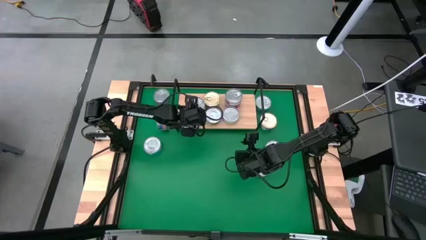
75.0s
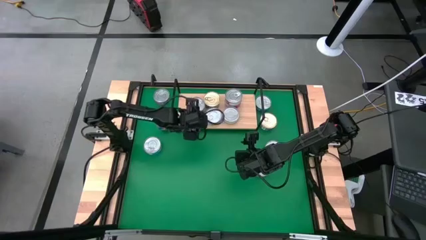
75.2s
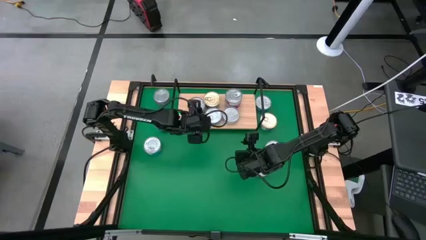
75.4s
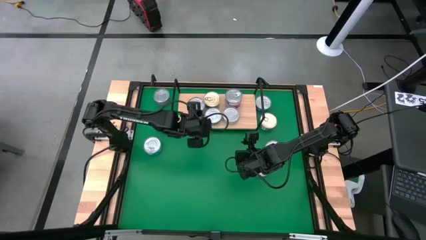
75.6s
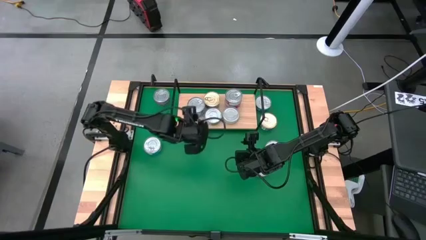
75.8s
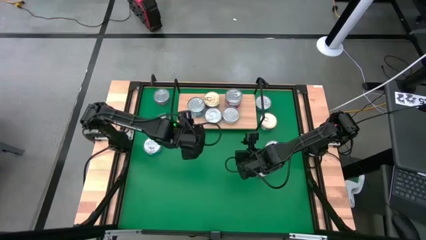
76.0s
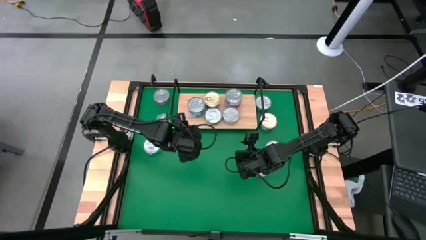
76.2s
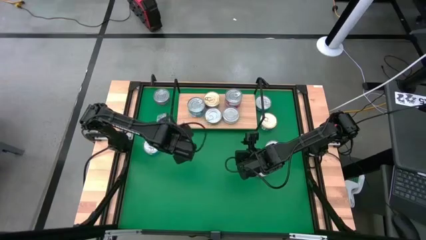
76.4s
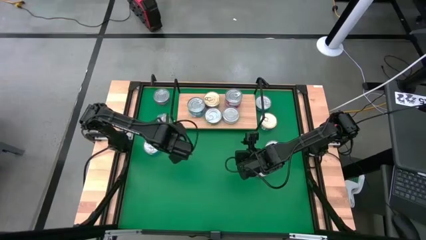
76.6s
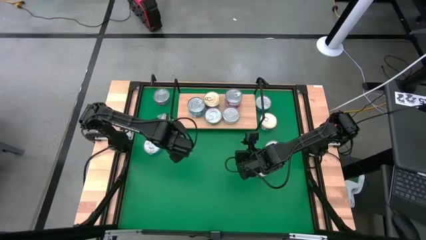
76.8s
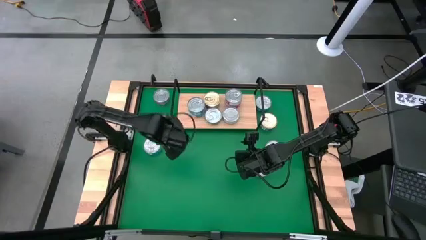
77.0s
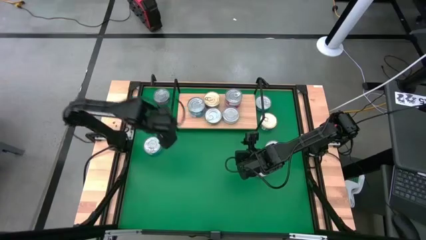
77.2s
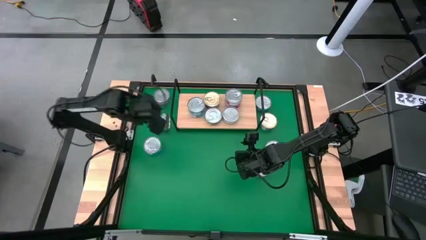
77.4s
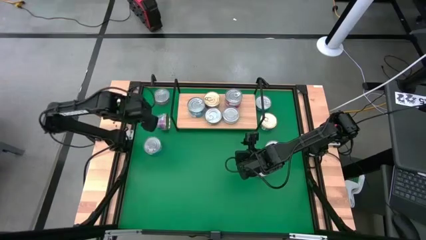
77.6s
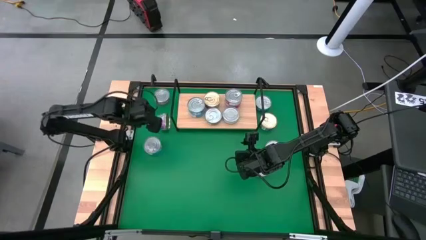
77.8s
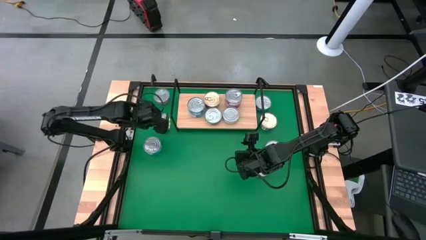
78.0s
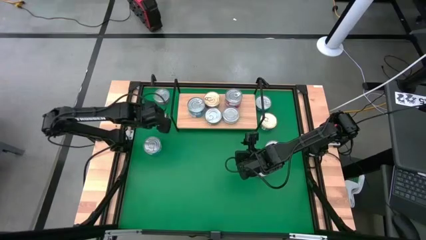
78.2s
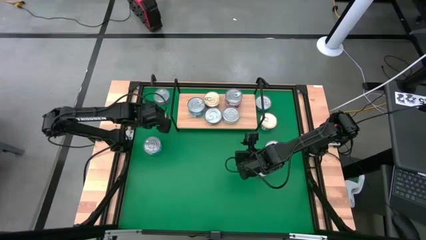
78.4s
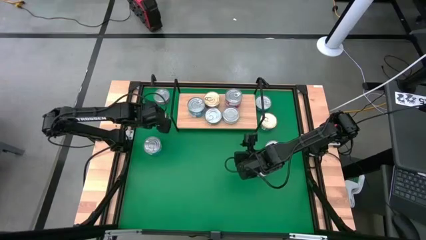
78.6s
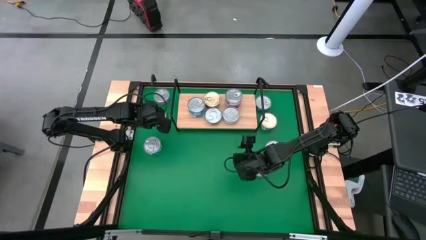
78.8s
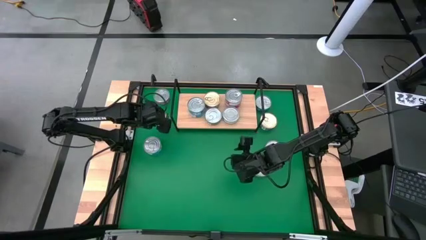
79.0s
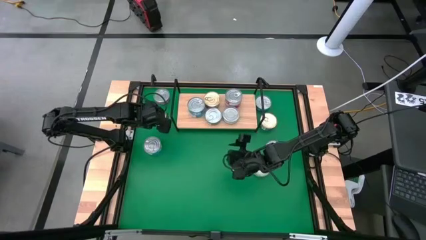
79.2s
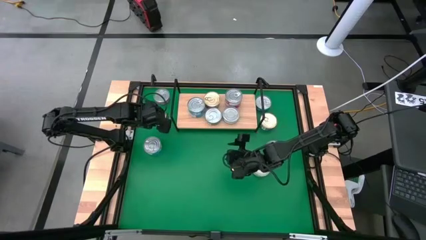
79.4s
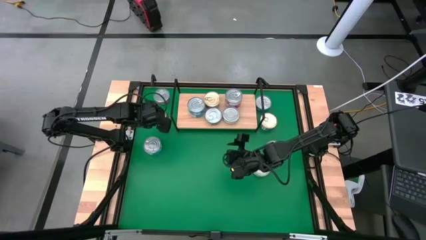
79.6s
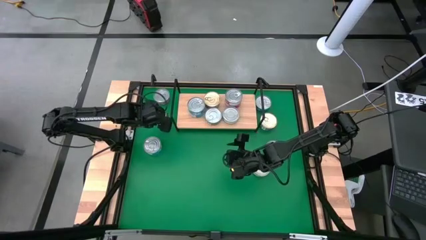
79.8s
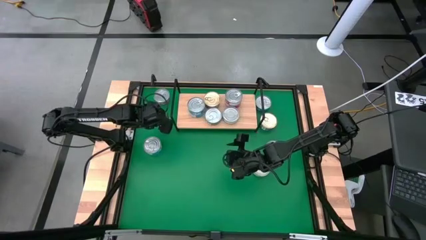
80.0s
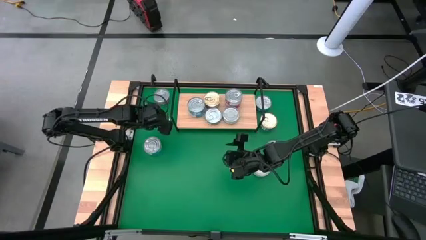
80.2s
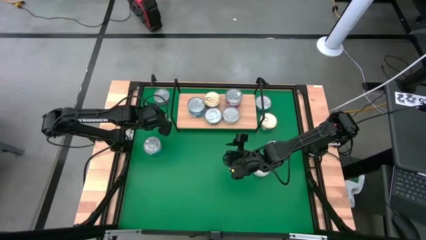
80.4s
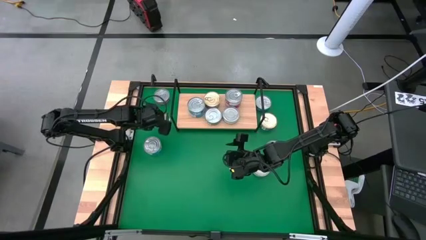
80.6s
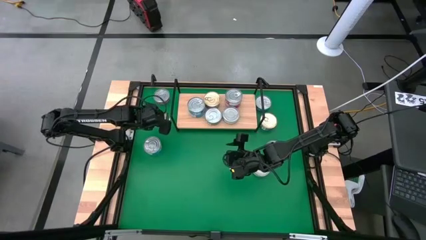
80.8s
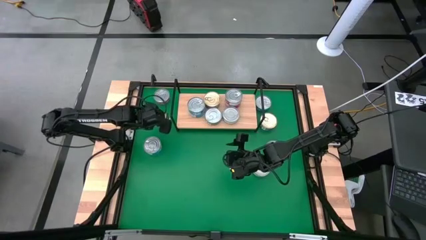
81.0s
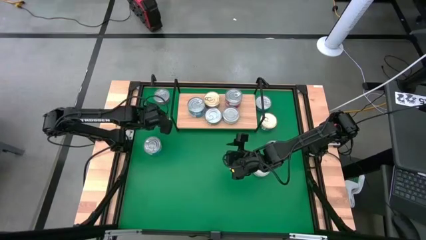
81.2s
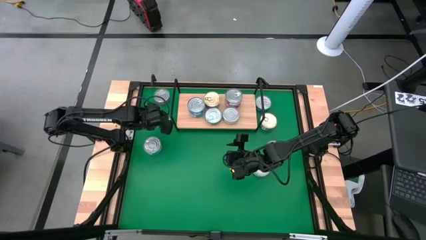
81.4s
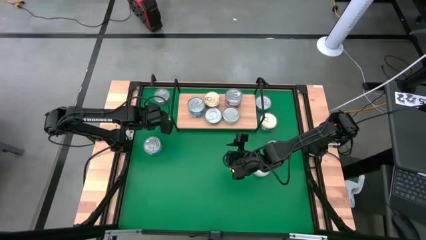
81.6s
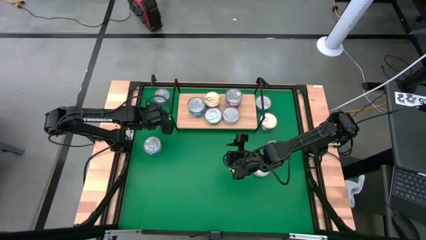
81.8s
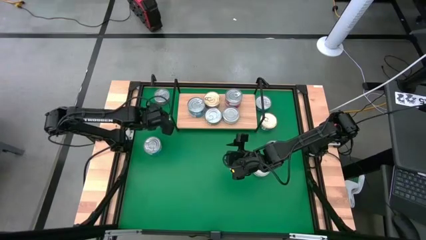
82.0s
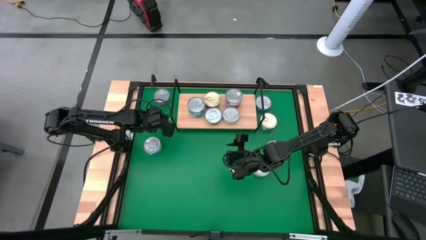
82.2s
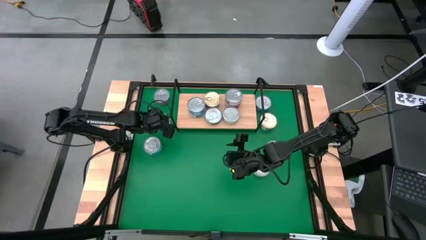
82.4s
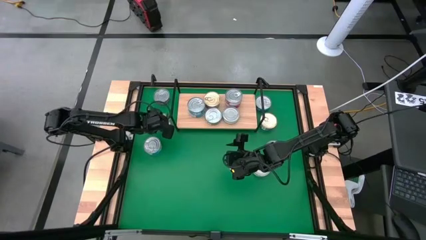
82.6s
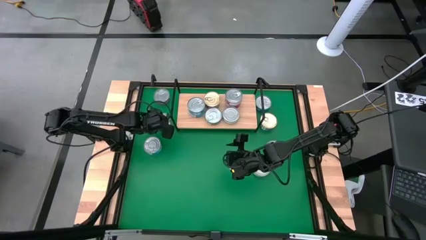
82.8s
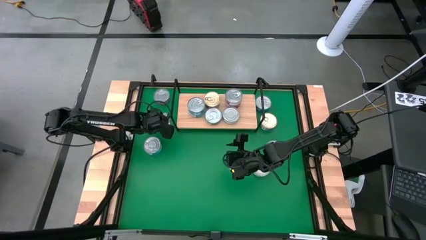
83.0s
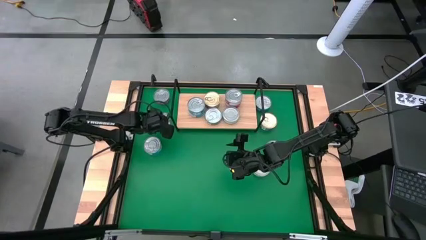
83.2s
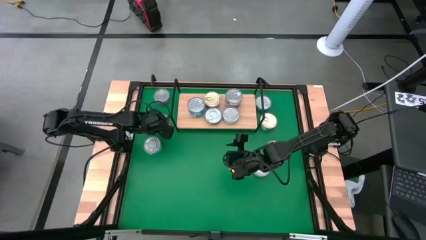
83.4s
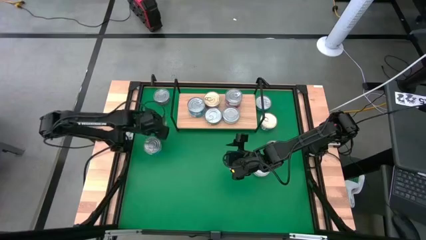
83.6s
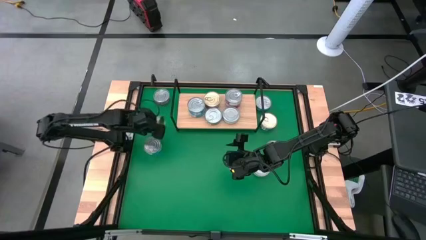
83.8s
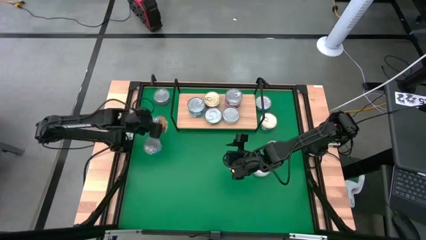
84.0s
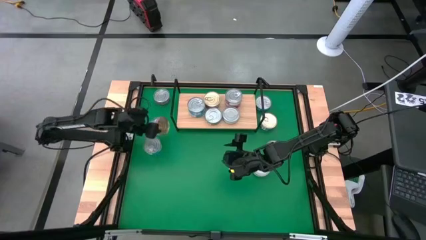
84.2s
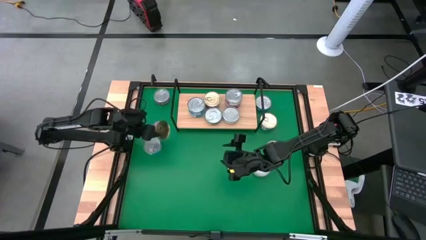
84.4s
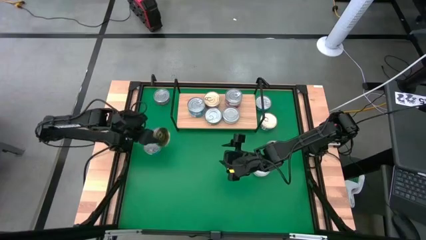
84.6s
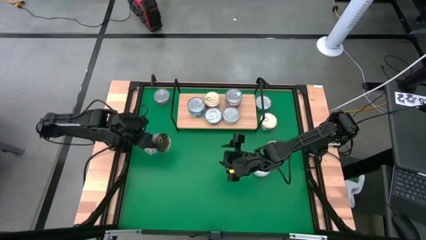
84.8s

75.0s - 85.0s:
Task: Stack canned seafood by type on shelf
Stack the blue pink tuna can on top of the blue pink tuna can on the shelf

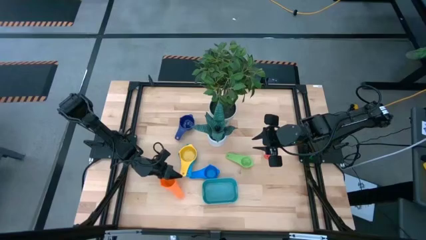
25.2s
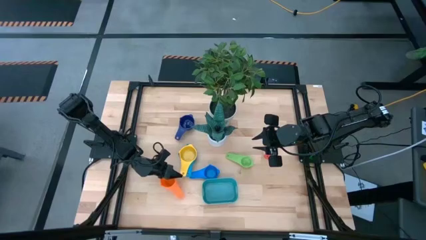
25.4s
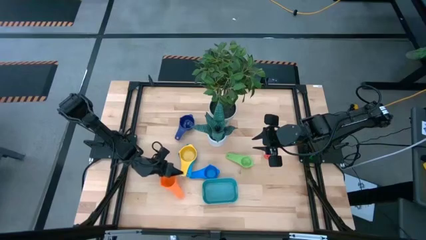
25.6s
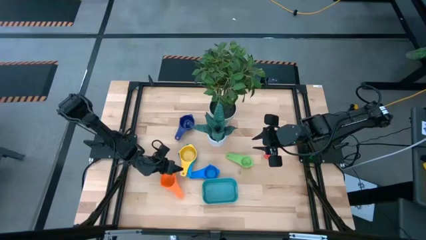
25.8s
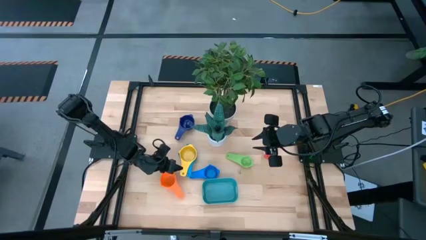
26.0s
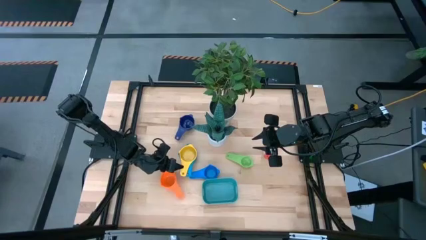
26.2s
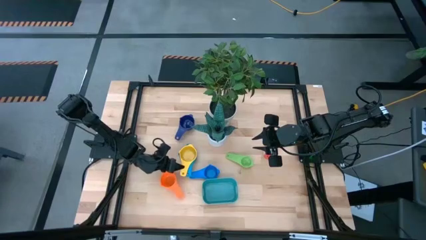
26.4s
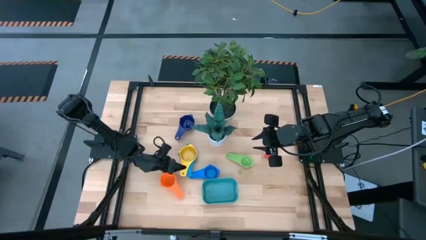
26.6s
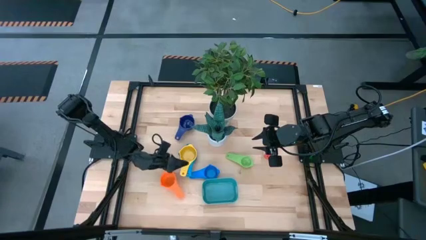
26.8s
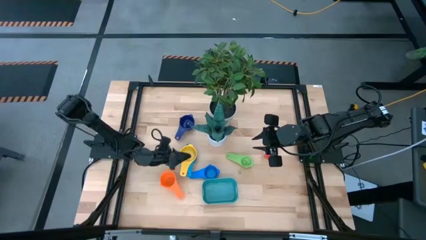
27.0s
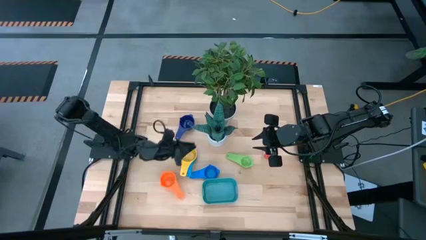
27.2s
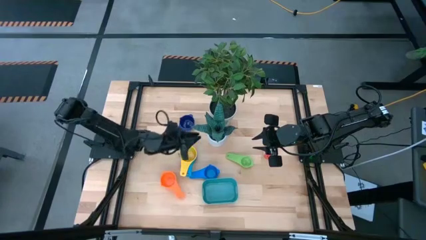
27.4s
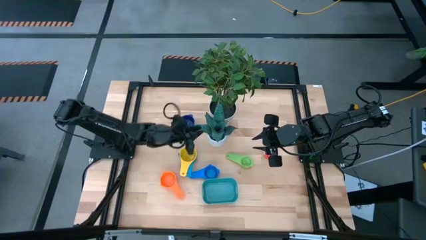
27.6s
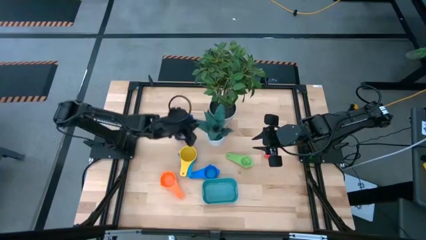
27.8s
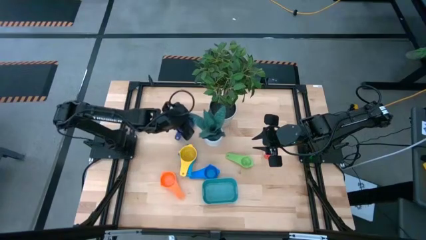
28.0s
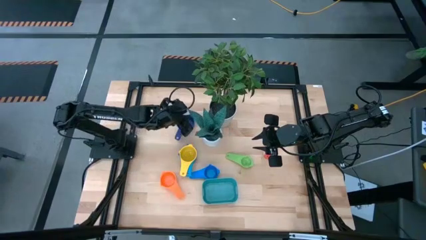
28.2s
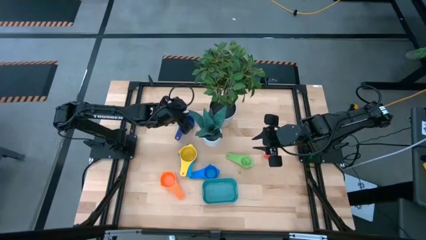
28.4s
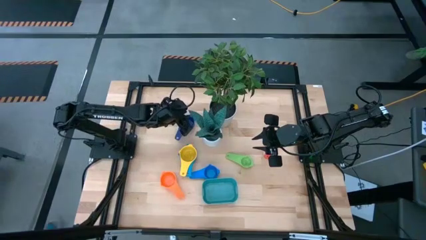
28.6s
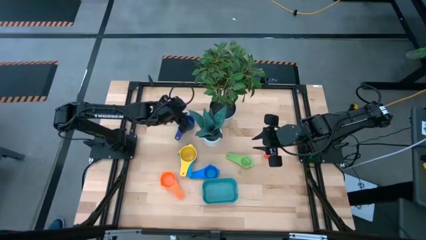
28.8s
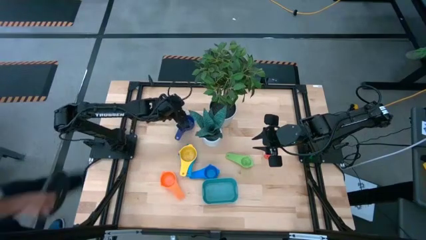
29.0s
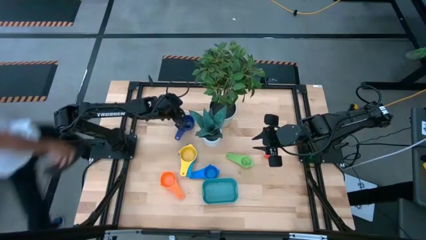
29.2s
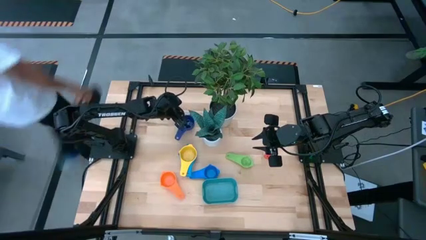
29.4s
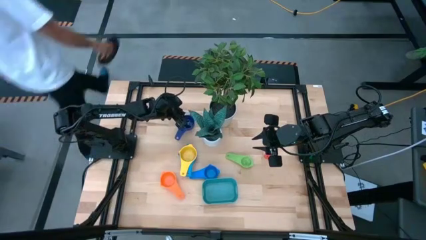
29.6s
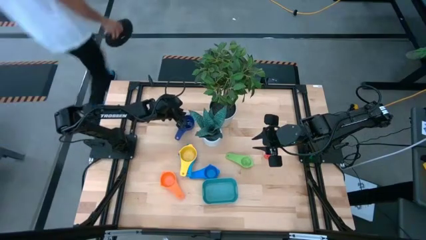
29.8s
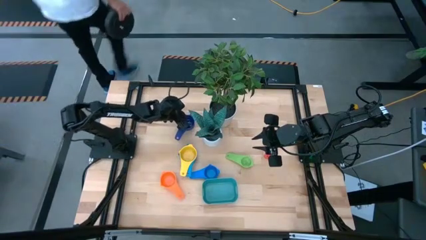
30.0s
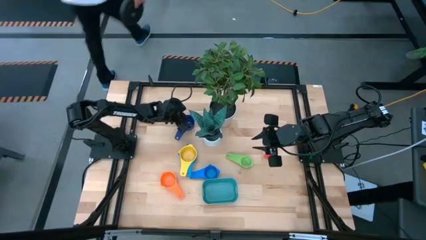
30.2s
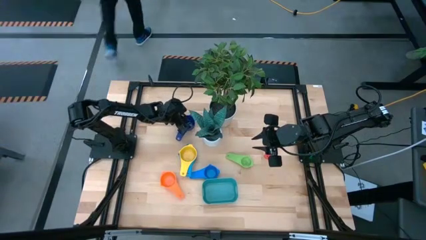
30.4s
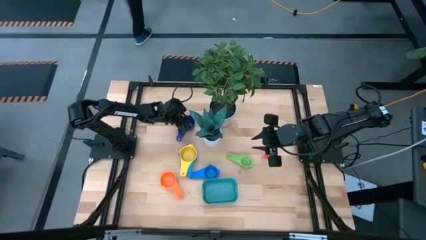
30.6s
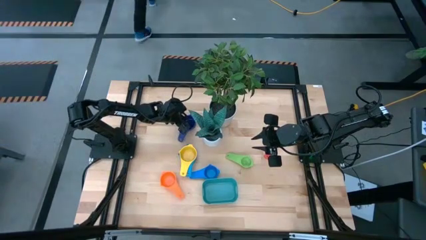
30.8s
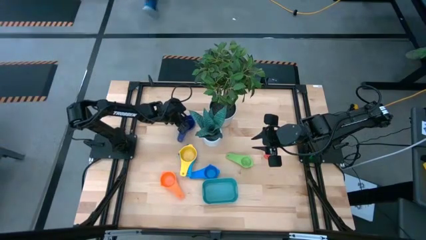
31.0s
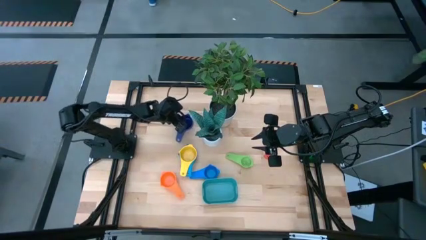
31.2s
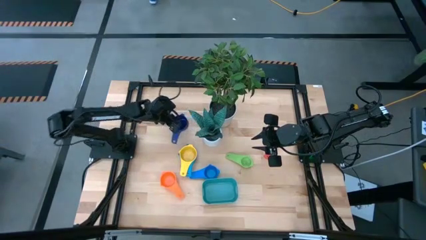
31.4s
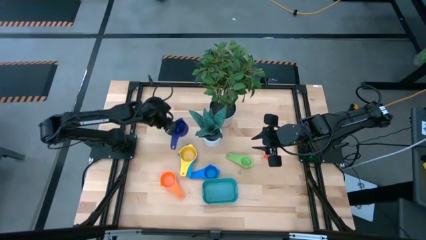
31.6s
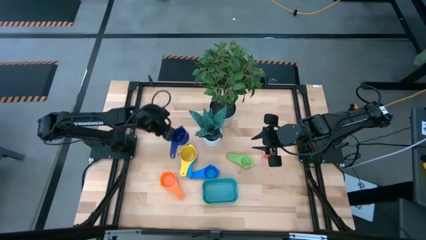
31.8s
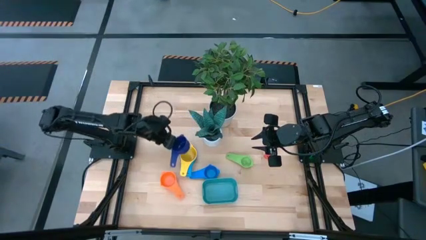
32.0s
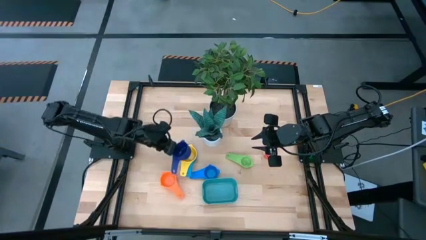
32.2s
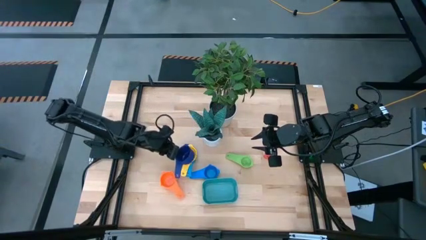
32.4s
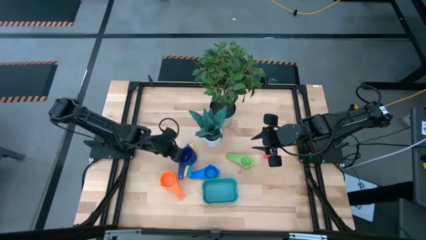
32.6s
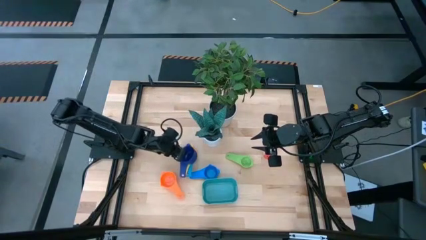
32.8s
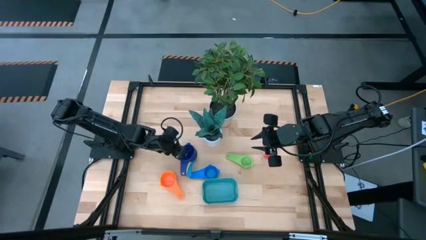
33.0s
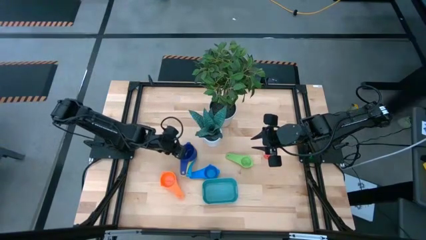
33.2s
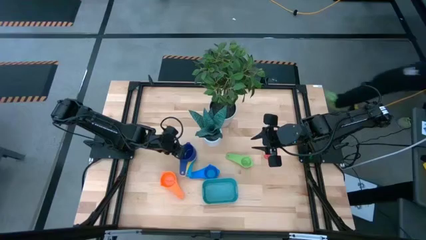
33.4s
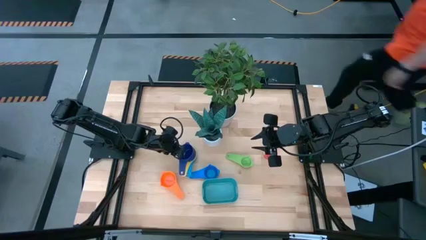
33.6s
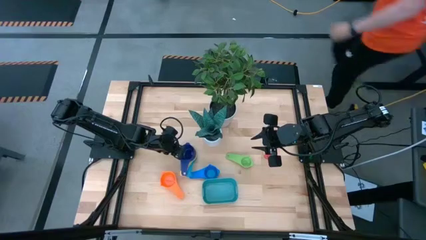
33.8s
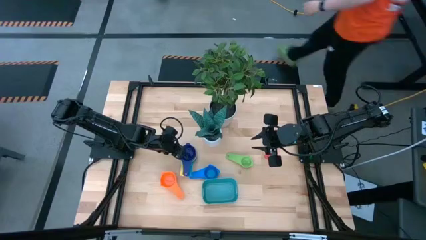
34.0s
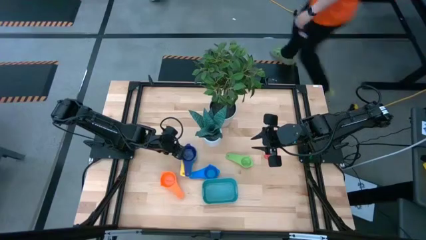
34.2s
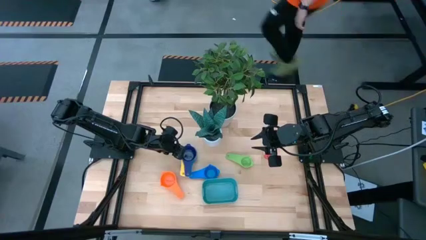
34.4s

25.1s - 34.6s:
Task: Nest measuring cups in basket
Stack the dark blue measuring cup on top of the yellow measuring cup
